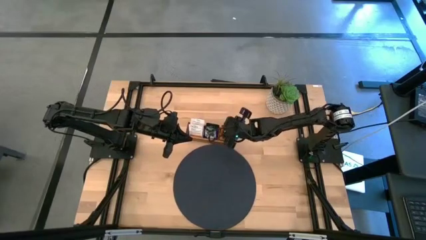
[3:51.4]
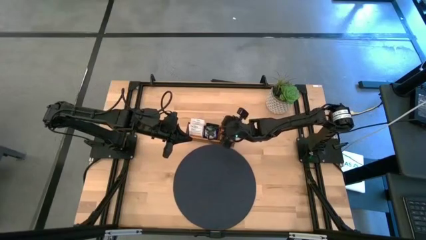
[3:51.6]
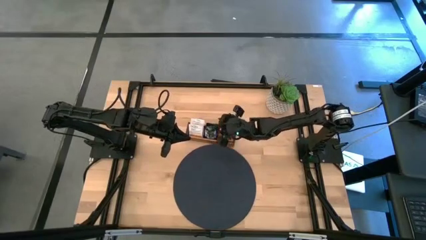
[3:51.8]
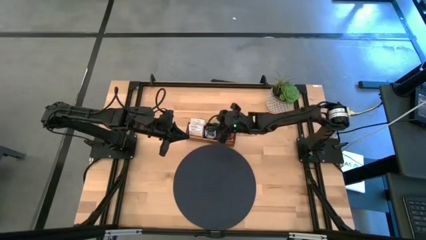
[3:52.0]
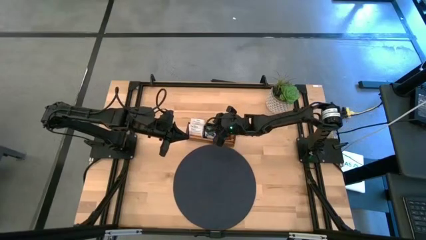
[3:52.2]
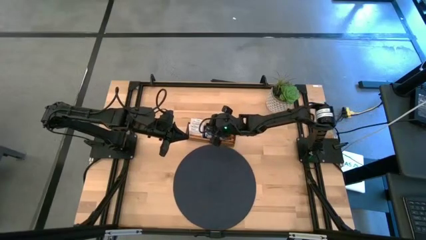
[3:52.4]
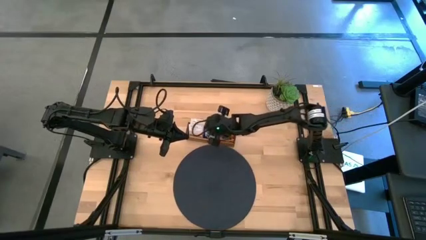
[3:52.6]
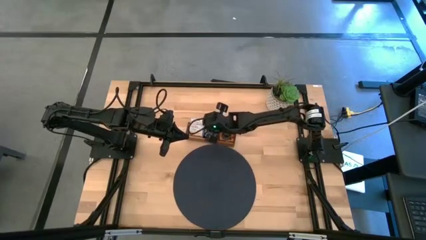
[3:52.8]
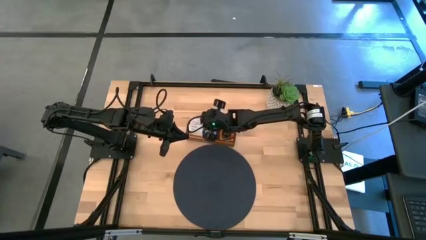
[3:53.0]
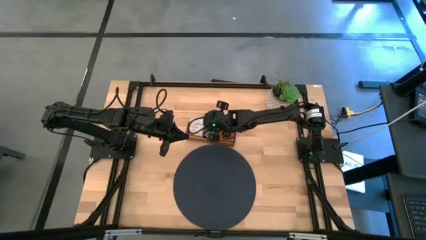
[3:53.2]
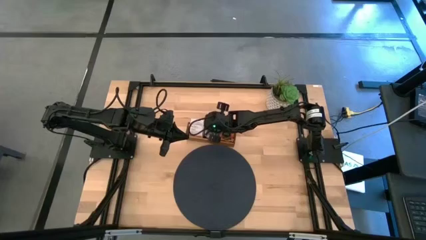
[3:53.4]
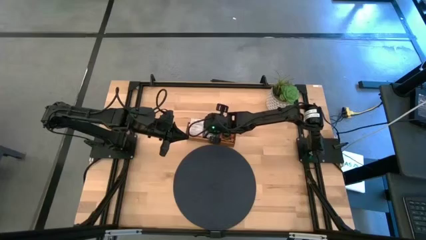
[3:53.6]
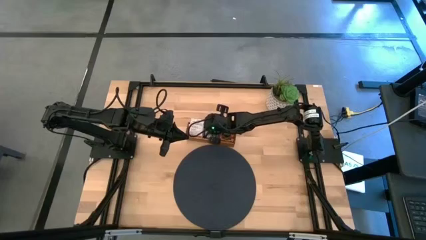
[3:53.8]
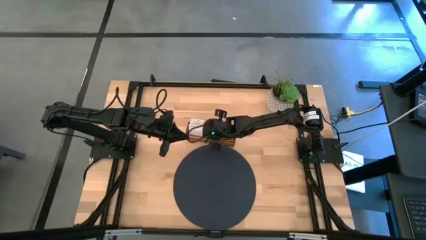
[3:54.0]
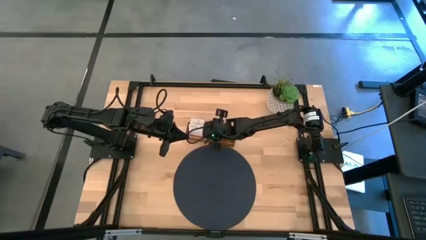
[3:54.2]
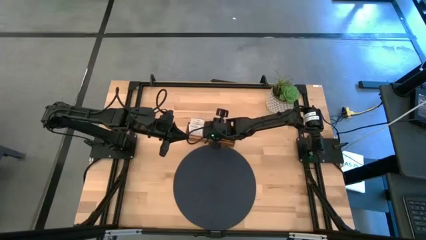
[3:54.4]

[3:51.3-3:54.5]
Task: Pick & Place Tea
Adjust the orange tea bags in the wooden organizer

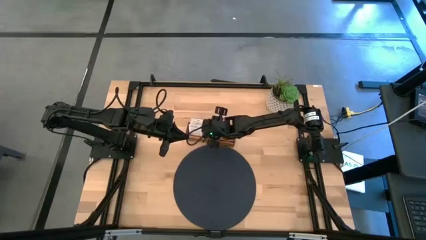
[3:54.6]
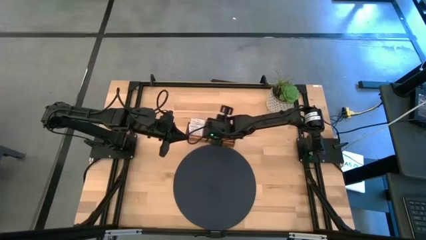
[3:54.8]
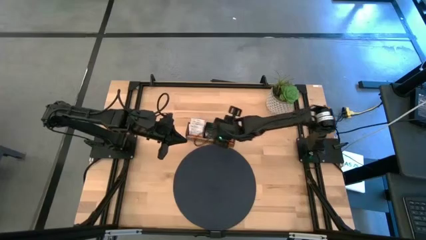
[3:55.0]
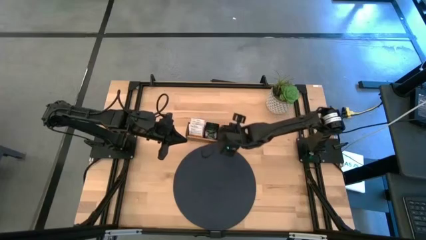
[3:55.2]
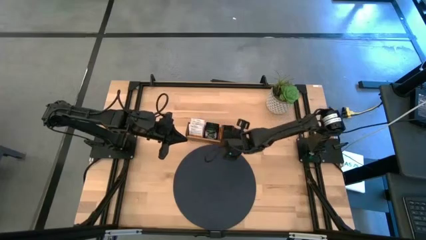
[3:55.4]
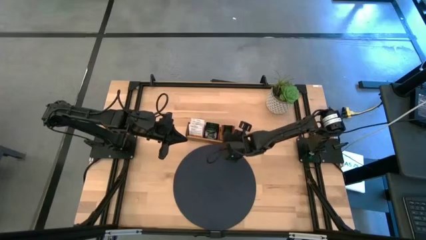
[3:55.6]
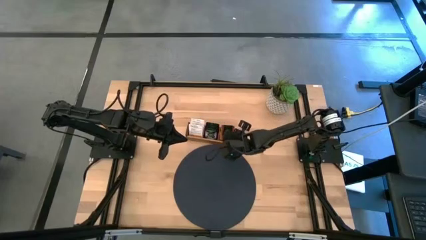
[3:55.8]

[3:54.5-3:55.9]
Adjust the orange tea bags in the wooden organizer

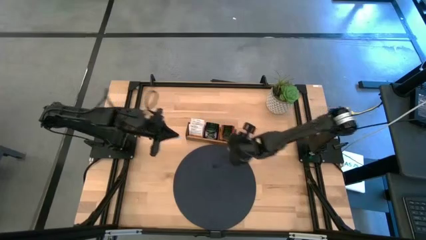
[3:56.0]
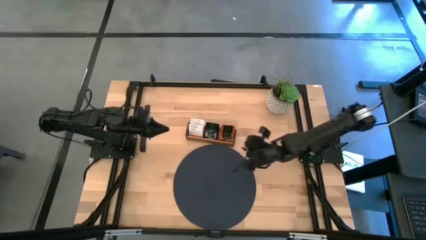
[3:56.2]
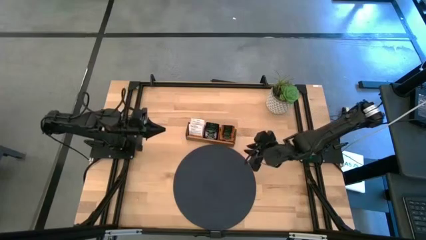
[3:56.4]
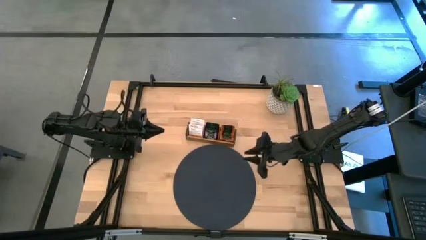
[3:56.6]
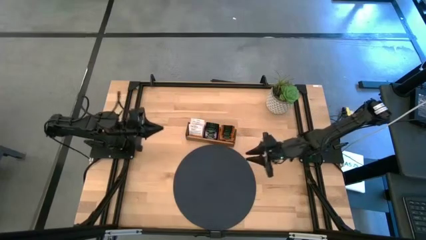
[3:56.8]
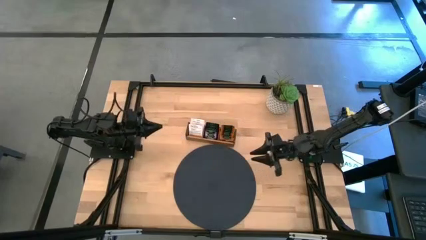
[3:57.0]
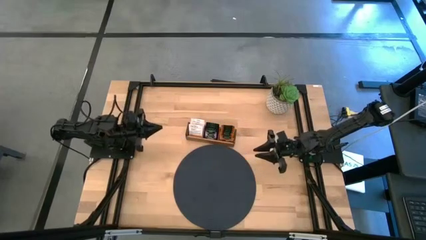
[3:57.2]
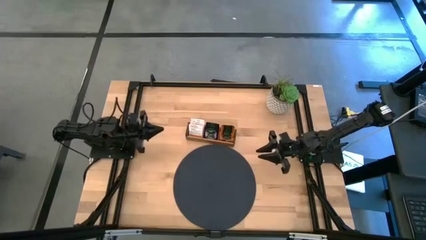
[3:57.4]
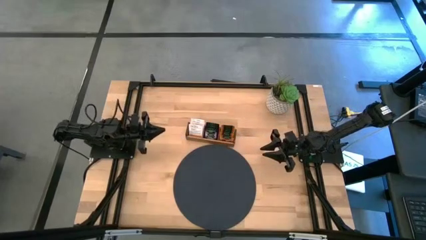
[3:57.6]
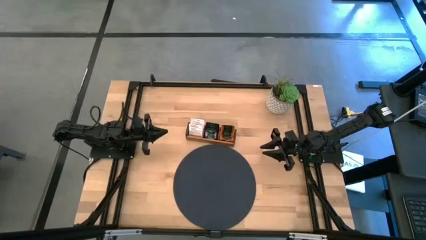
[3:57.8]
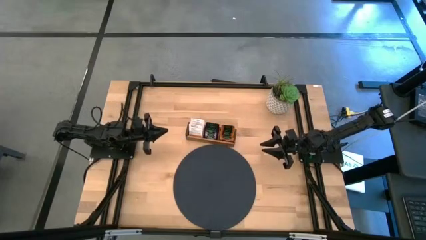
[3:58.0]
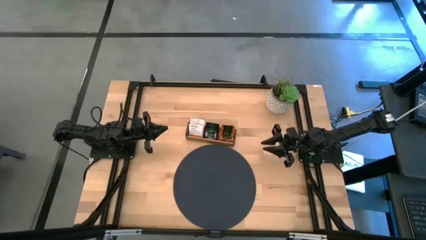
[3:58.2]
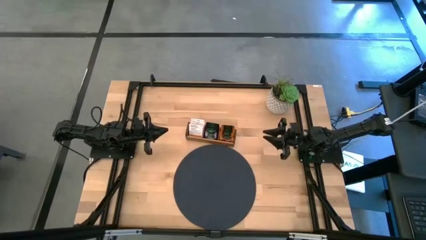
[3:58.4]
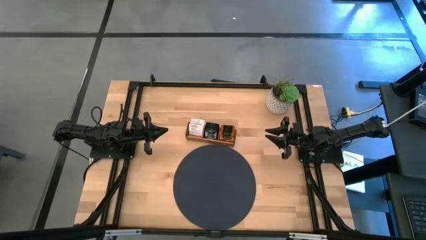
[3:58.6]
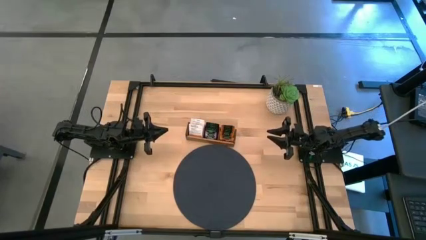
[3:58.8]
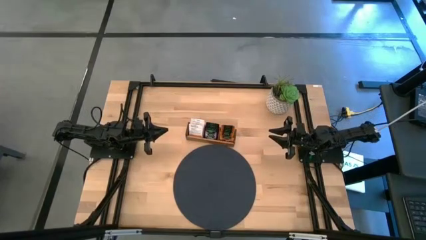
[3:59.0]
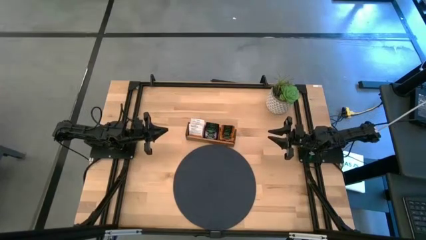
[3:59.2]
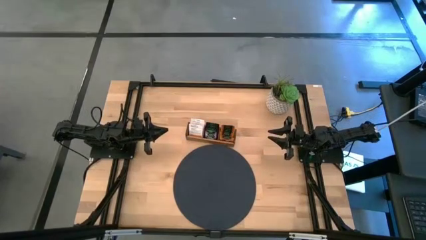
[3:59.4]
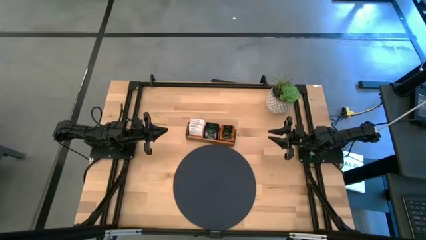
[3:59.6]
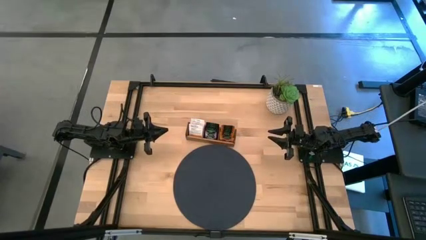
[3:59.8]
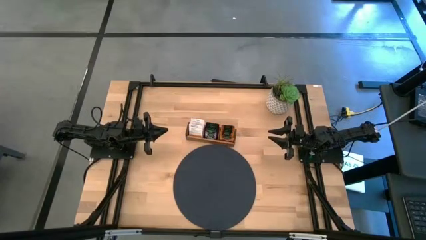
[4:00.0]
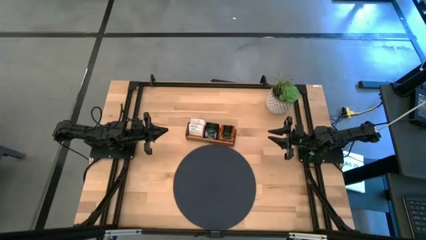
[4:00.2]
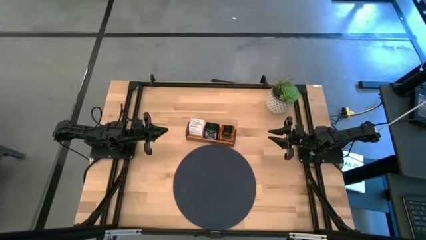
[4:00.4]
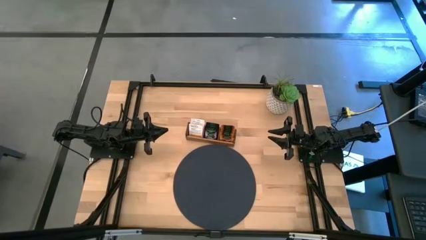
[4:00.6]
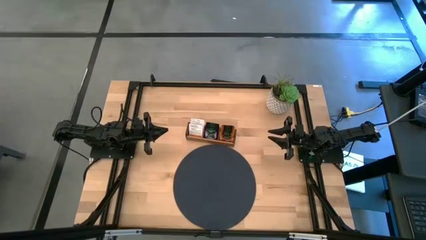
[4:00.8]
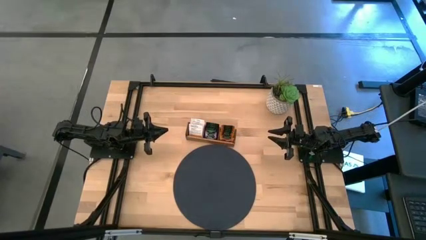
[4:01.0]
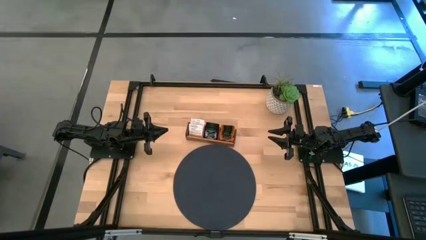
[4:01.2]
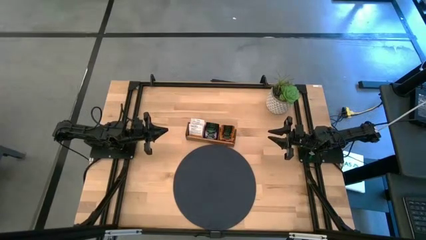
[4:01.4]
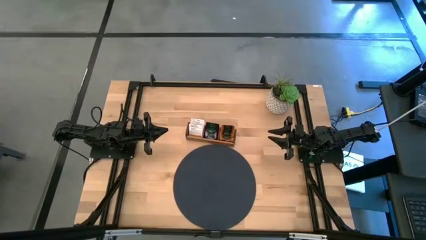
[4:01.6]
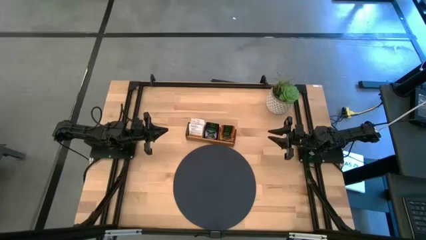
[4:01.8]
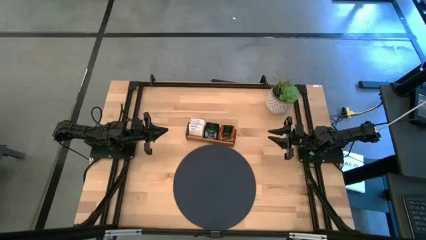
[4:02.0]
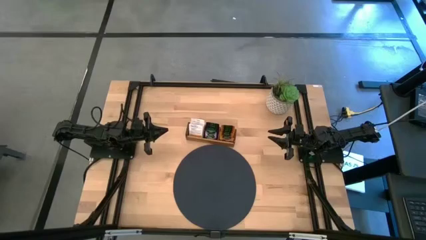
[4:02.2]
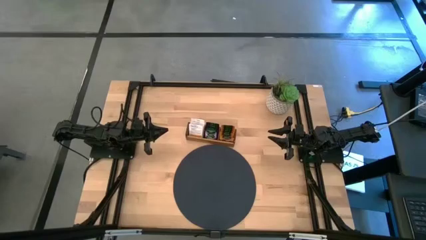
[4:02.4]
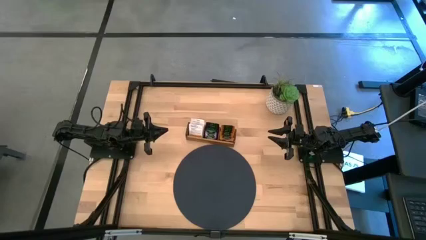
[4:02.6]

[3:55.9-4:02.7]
Return to Home Position

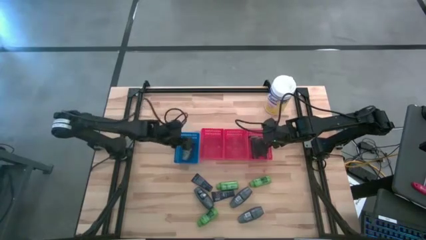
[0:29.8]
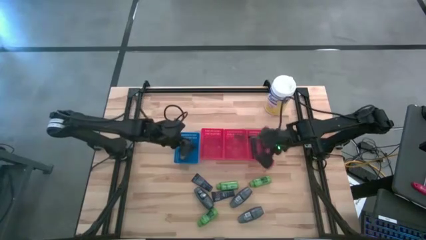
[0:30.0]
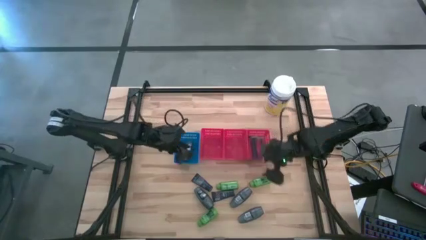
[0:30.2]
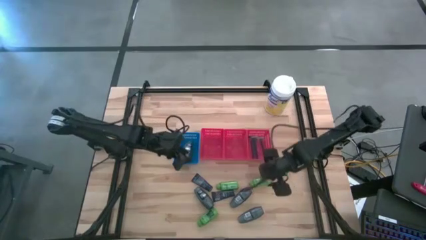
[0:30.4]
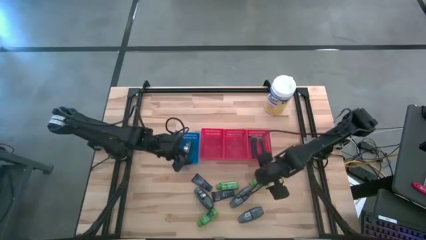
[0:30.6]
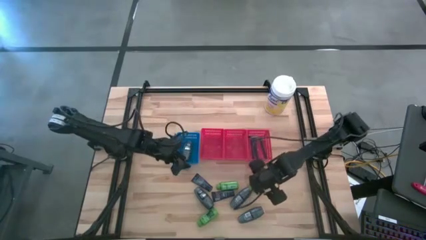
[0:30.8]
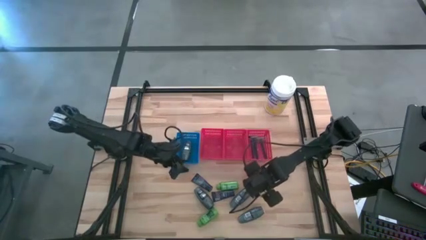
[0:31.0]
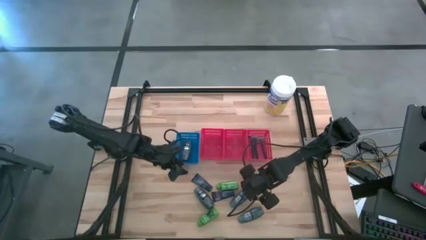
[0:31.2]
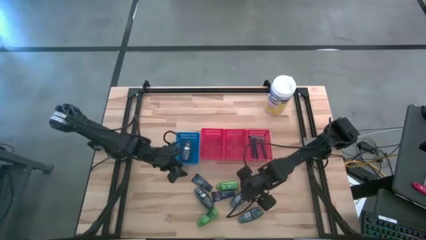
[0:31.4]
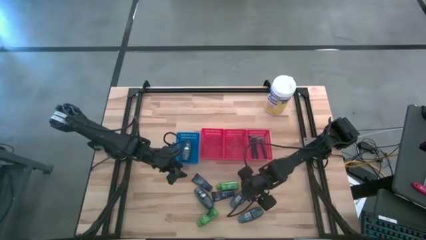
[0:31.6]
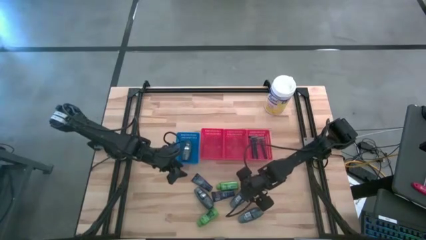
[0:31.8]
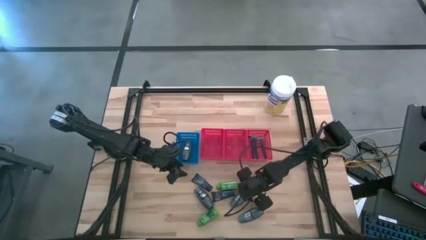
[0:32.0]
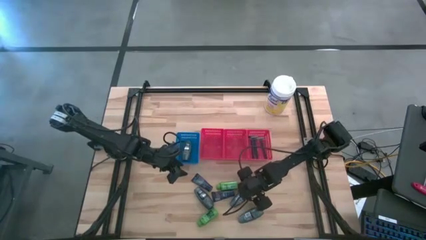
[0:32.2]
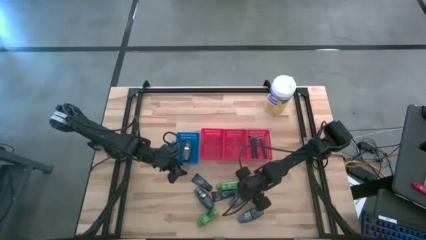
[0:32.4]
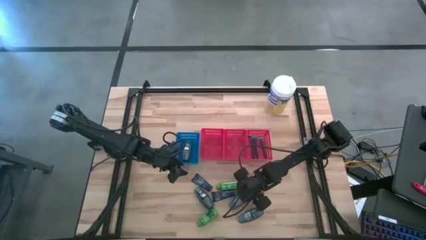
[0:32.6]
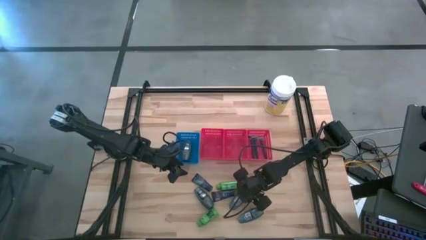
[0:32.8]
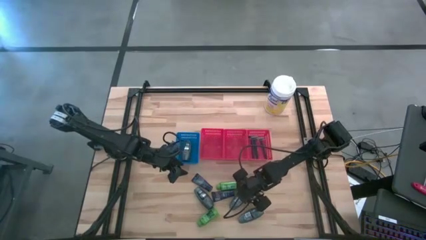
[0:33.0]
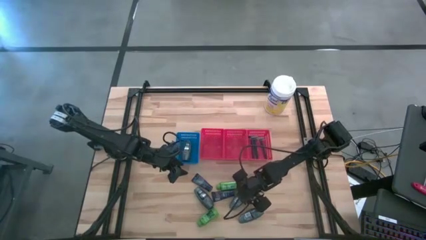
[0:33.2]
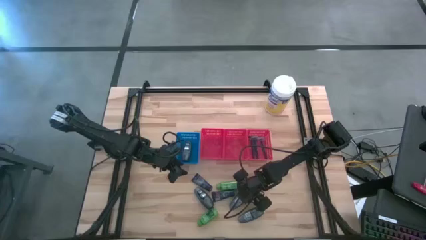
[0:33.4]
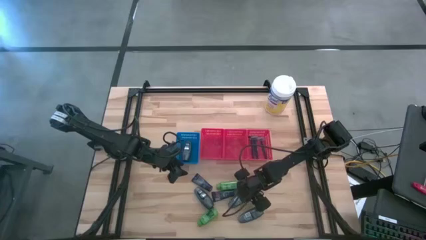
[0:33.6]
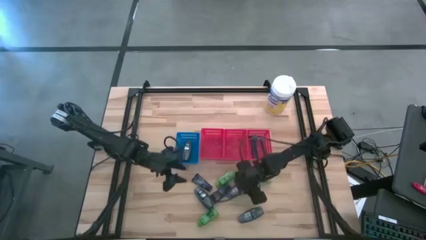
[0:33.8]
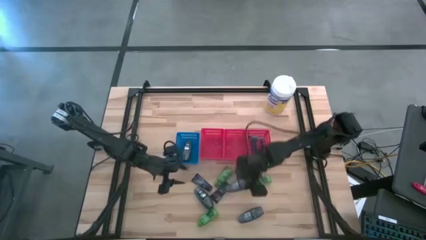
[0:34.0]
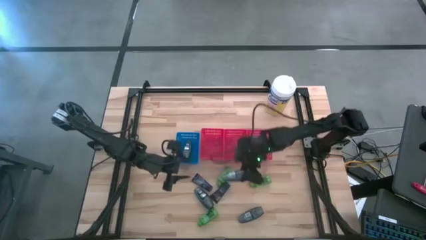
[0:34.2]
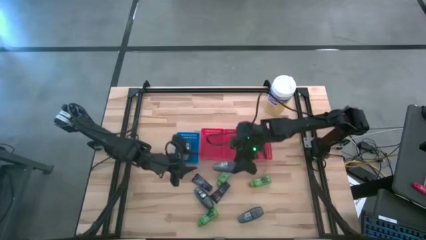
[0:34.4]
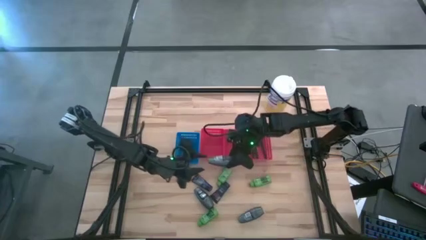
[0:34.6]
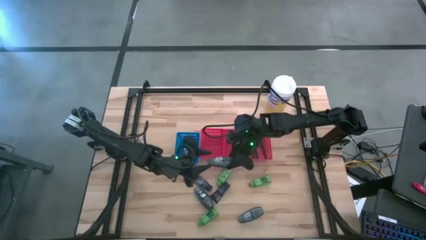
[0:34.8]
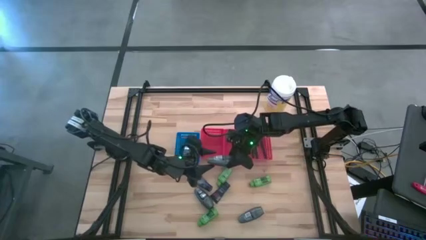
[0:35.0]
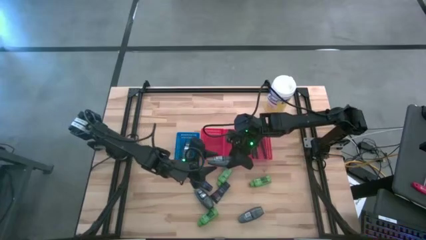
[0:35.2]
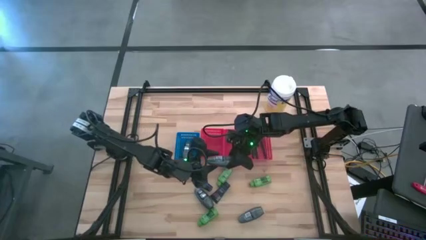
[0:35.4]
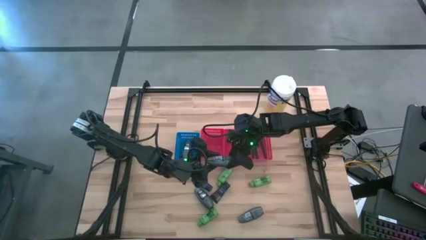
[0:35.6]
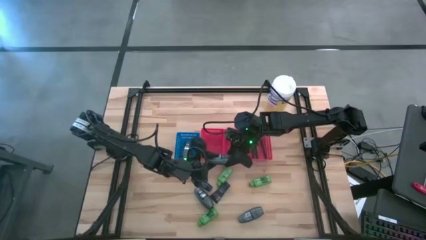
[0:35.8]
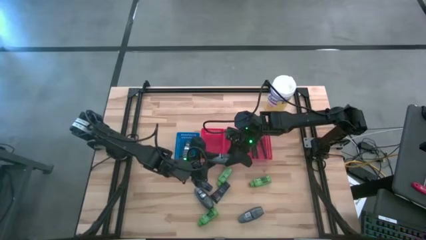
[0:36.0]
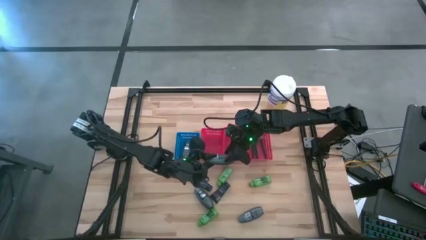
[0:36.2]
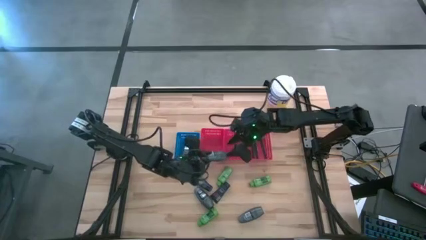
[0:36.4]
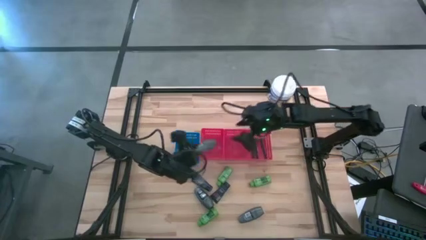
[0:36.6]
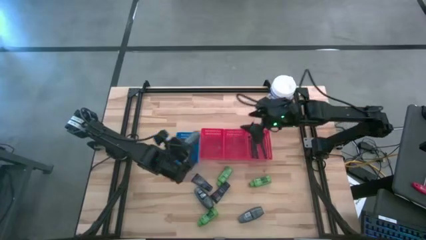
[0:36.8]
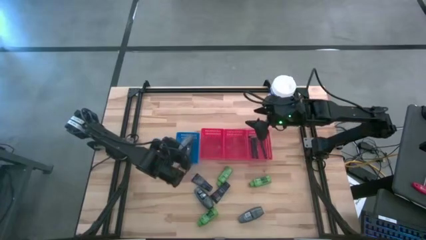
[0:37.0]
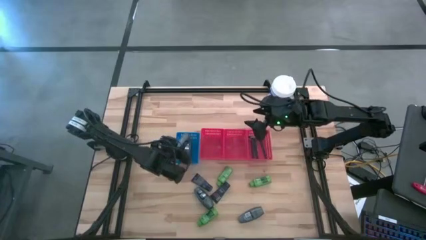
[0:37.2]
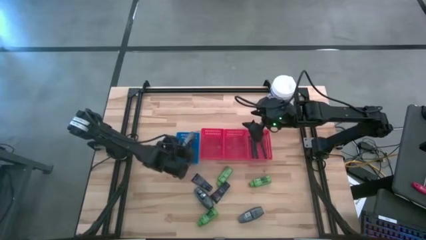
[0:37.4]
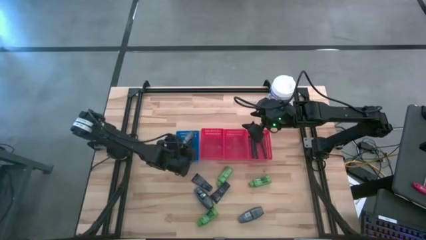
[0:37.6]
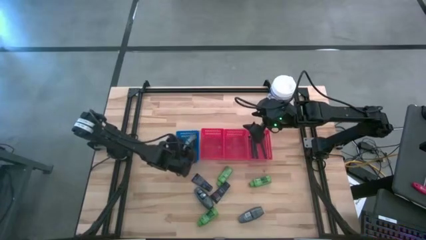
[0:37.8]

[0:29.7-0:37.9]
Task: Pick & Place Travel size toiletries
Put the gray deodorant into the blue bin
